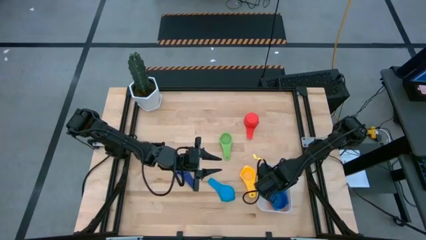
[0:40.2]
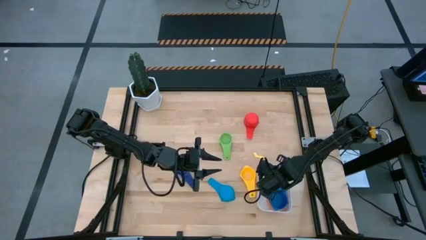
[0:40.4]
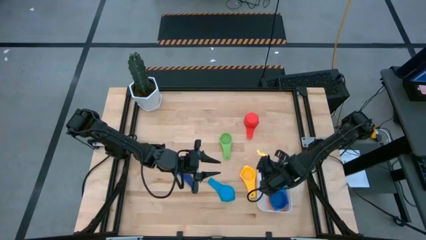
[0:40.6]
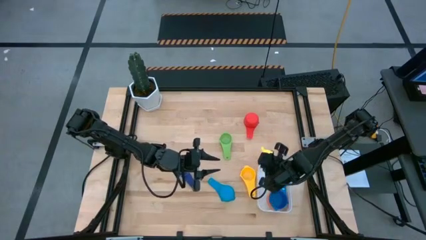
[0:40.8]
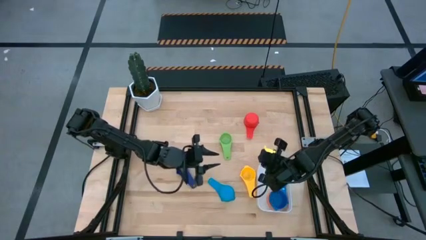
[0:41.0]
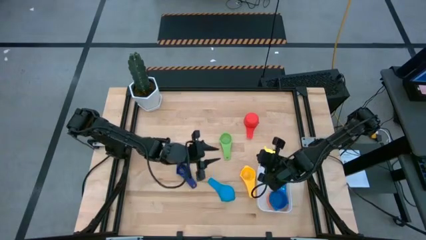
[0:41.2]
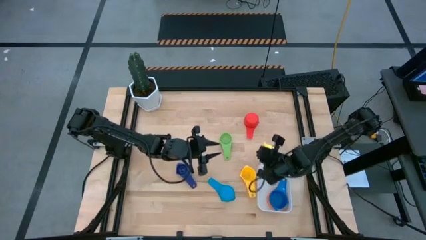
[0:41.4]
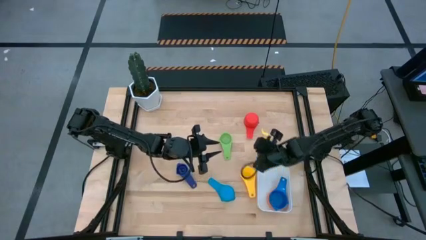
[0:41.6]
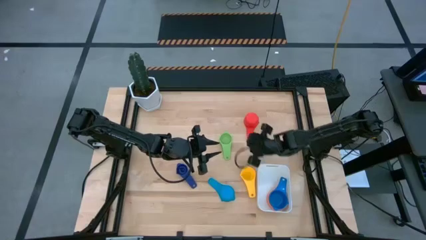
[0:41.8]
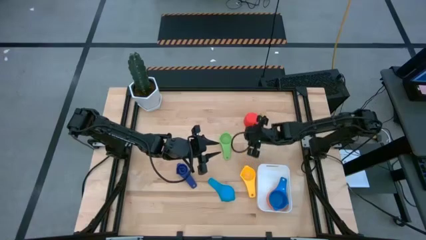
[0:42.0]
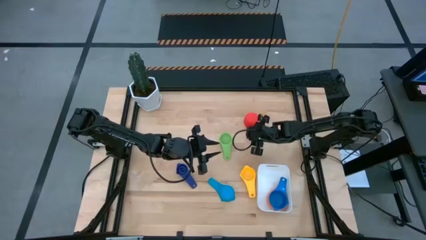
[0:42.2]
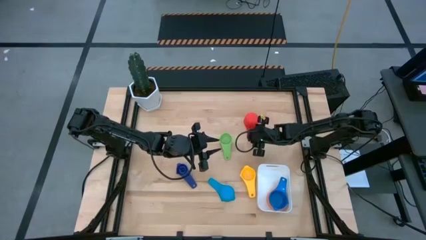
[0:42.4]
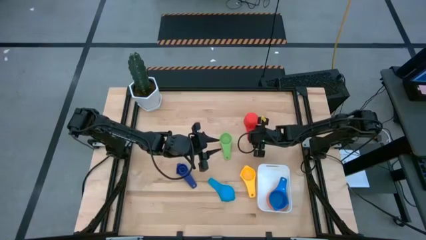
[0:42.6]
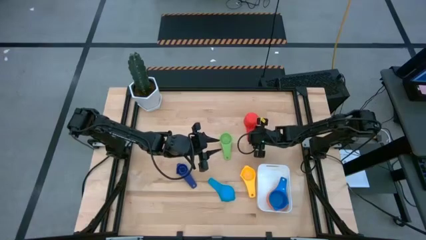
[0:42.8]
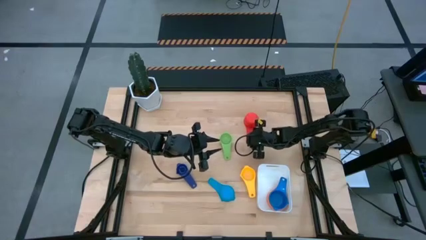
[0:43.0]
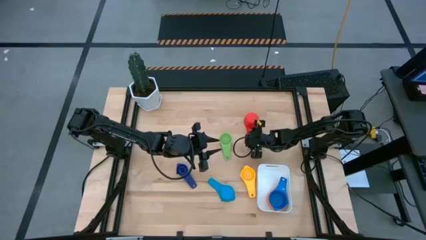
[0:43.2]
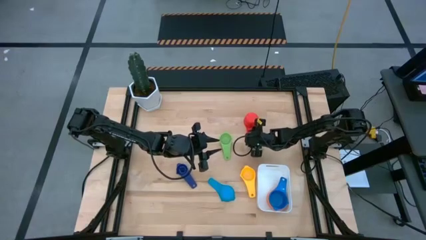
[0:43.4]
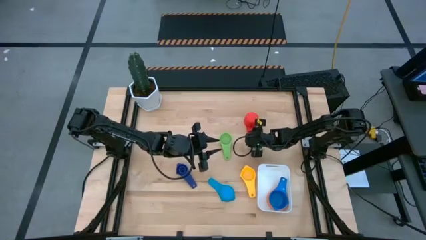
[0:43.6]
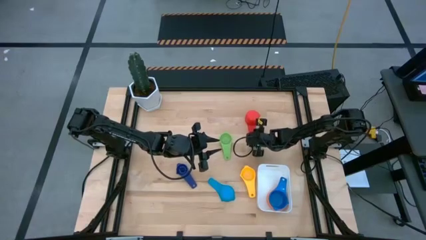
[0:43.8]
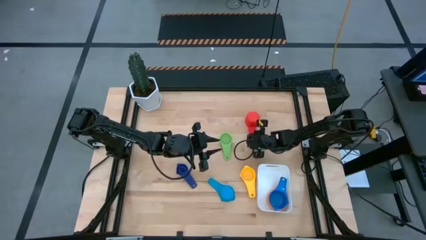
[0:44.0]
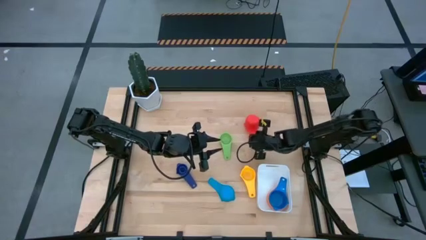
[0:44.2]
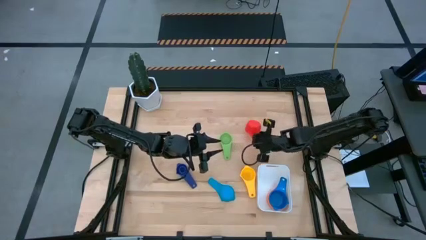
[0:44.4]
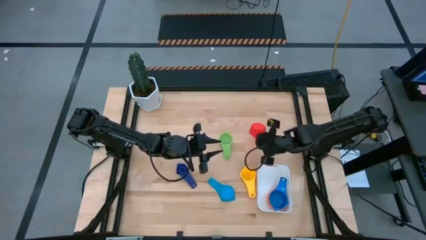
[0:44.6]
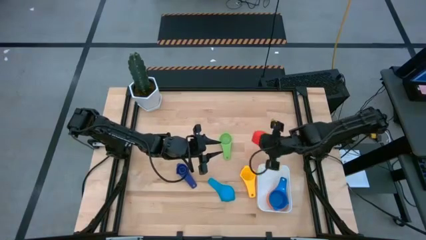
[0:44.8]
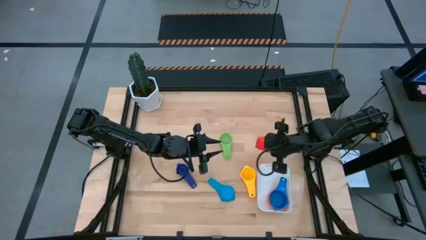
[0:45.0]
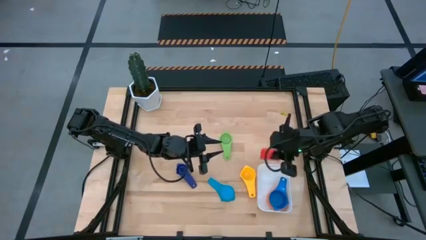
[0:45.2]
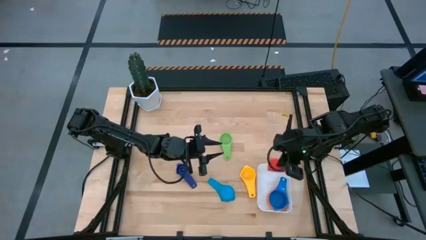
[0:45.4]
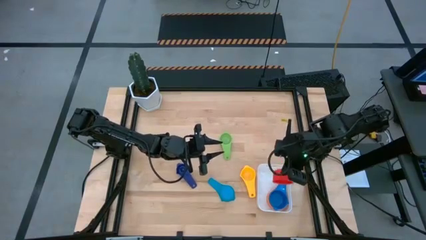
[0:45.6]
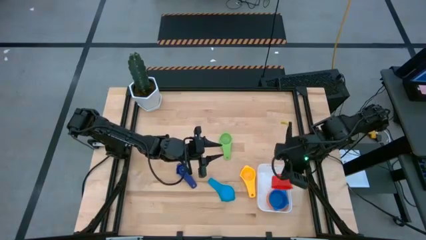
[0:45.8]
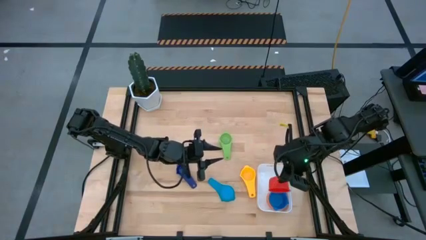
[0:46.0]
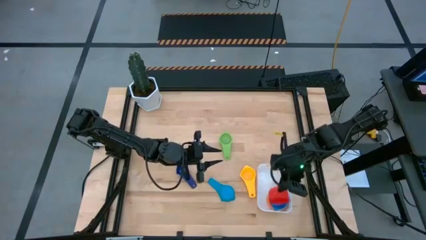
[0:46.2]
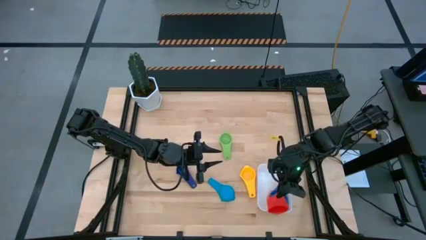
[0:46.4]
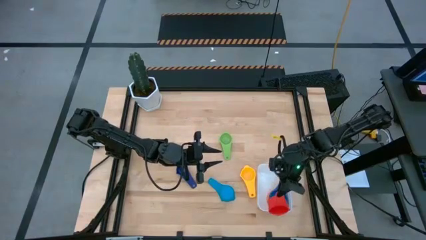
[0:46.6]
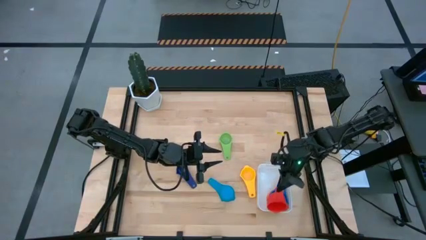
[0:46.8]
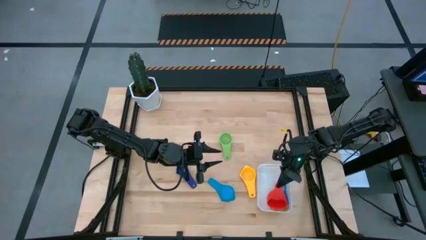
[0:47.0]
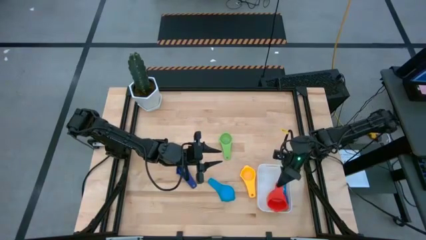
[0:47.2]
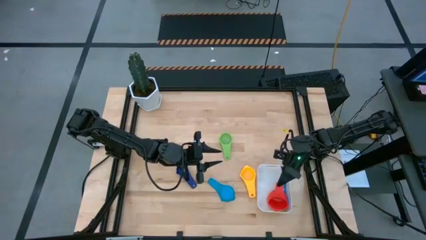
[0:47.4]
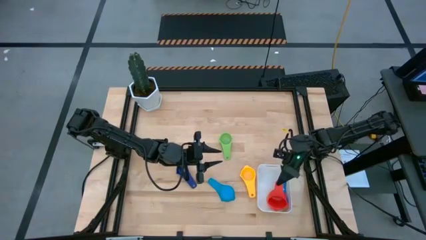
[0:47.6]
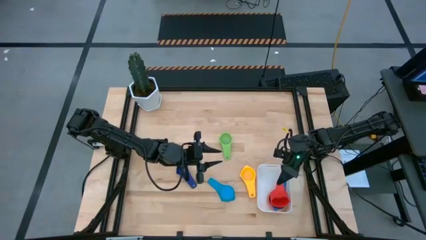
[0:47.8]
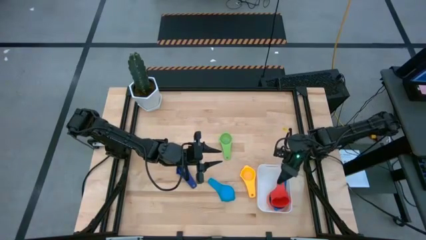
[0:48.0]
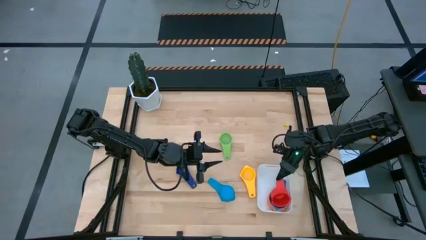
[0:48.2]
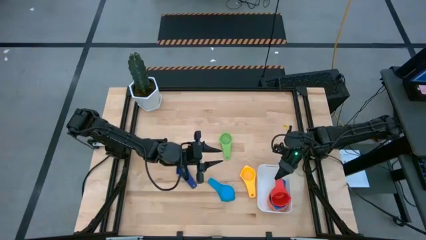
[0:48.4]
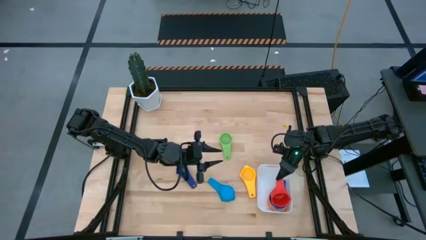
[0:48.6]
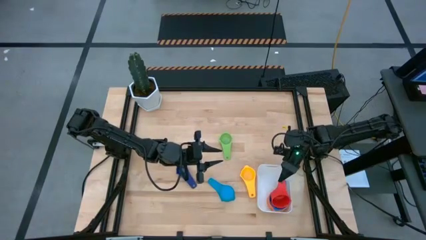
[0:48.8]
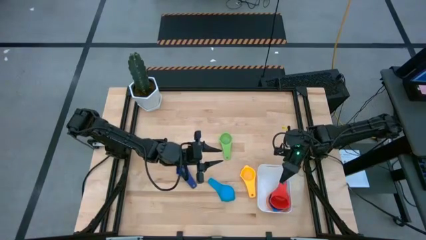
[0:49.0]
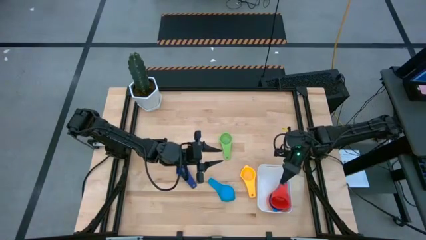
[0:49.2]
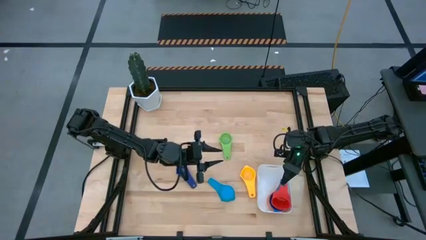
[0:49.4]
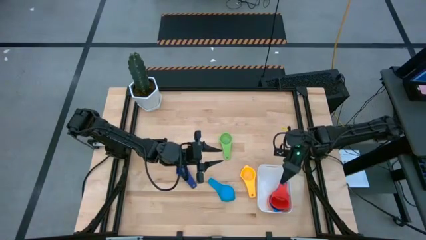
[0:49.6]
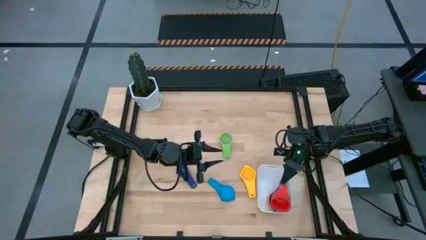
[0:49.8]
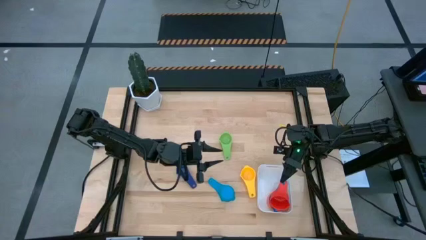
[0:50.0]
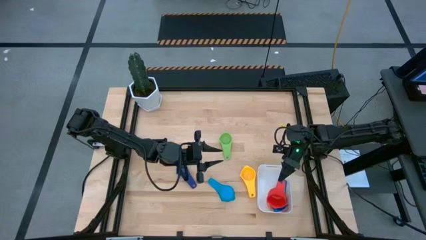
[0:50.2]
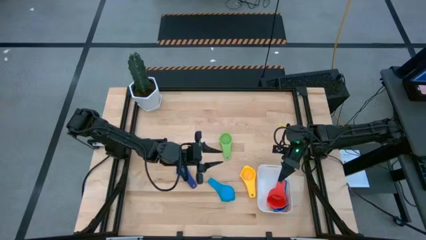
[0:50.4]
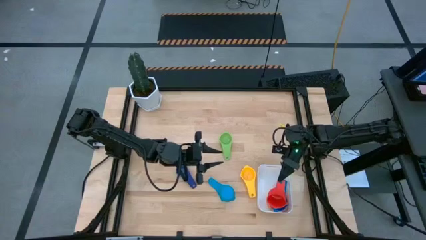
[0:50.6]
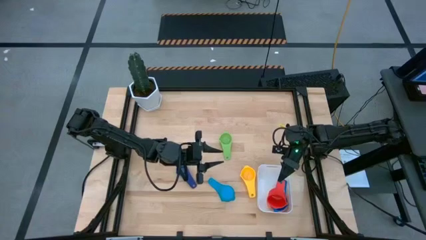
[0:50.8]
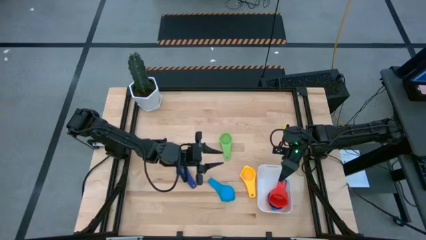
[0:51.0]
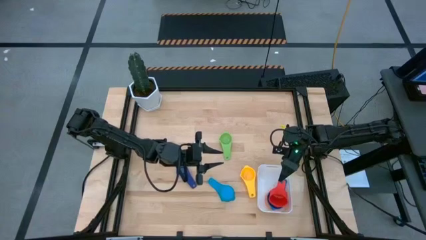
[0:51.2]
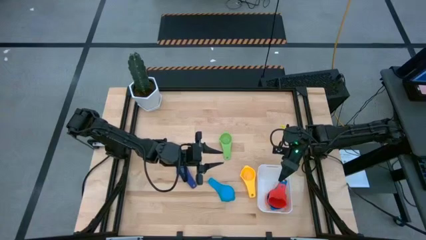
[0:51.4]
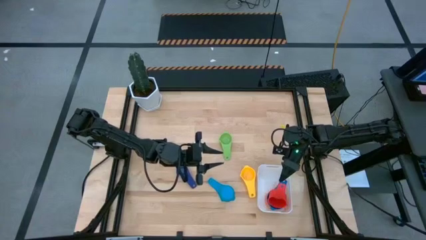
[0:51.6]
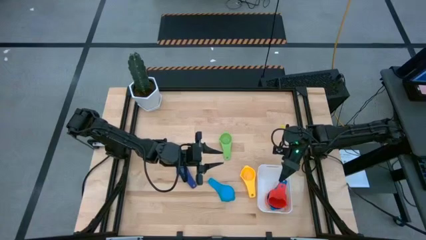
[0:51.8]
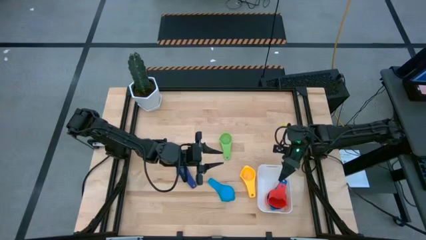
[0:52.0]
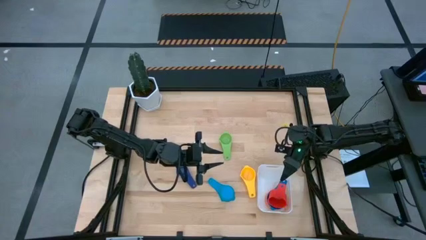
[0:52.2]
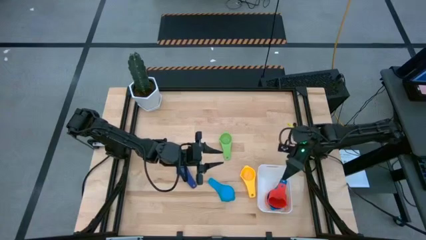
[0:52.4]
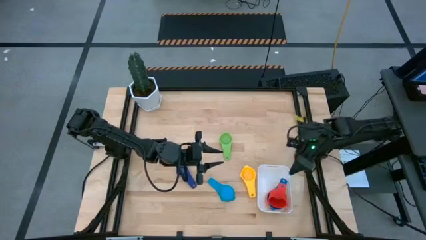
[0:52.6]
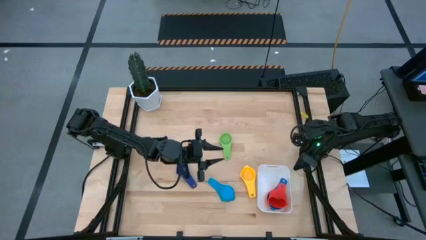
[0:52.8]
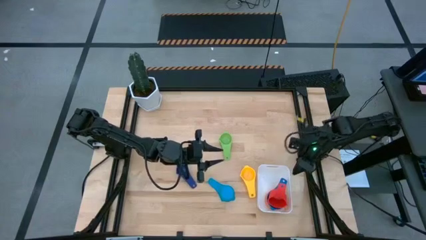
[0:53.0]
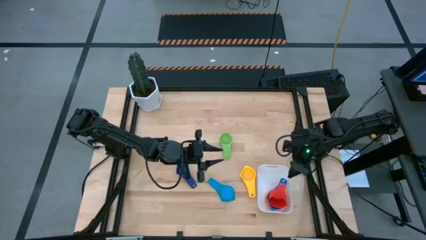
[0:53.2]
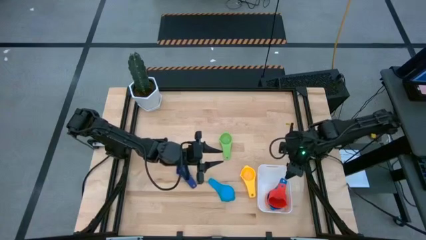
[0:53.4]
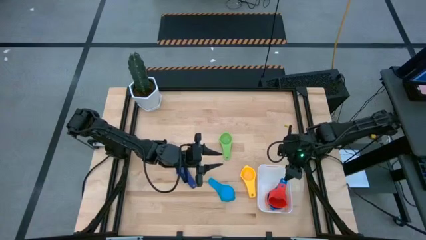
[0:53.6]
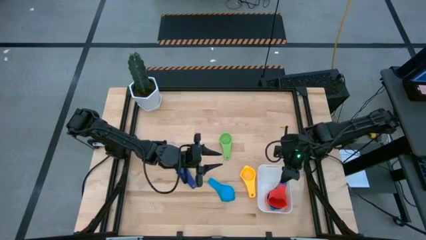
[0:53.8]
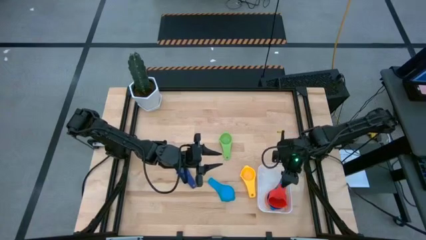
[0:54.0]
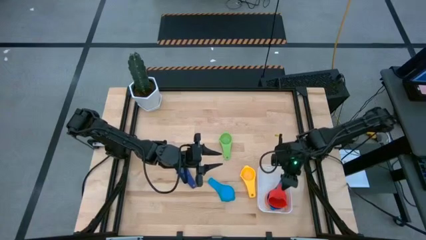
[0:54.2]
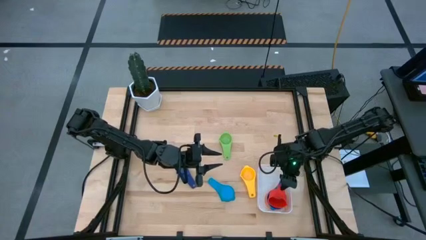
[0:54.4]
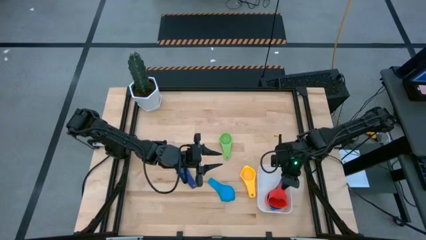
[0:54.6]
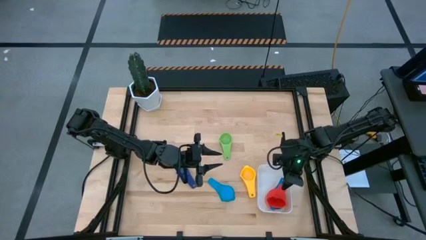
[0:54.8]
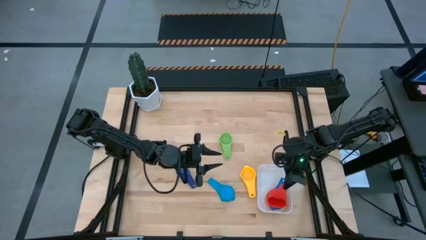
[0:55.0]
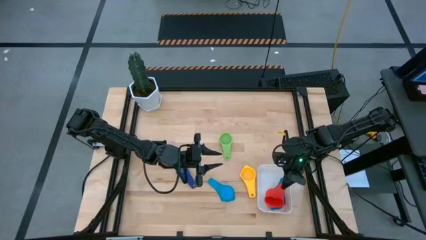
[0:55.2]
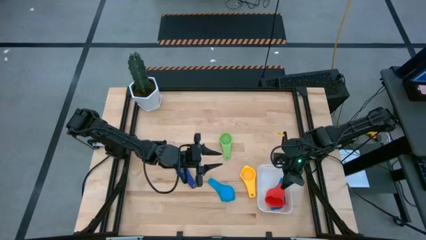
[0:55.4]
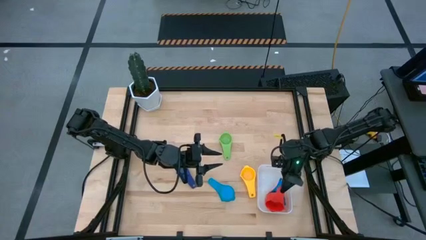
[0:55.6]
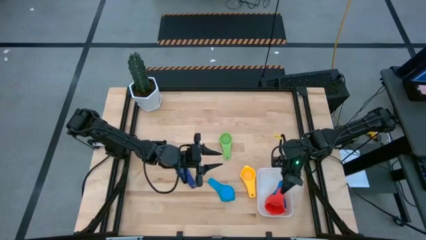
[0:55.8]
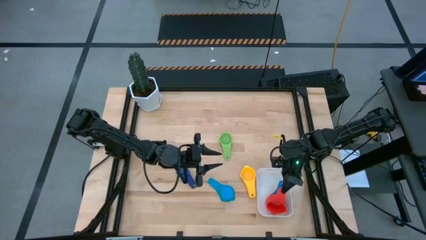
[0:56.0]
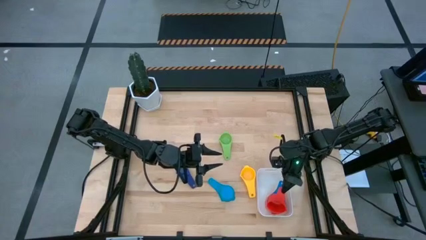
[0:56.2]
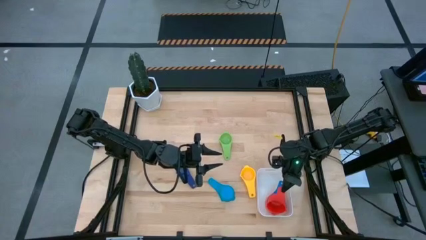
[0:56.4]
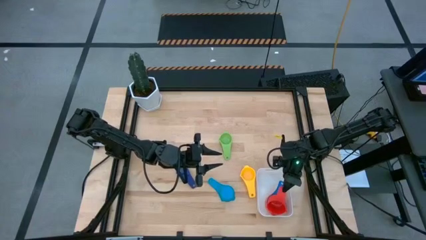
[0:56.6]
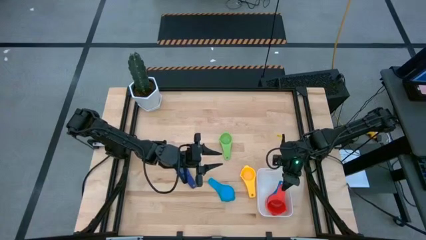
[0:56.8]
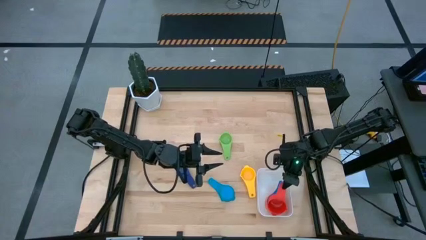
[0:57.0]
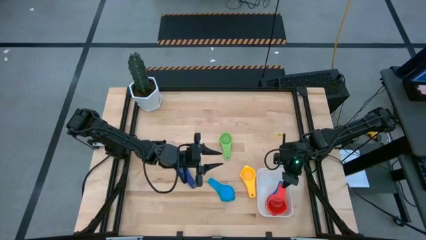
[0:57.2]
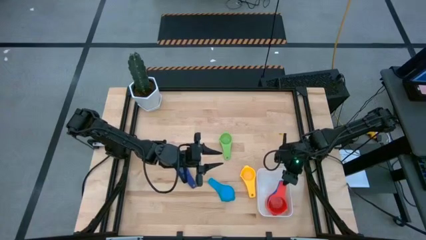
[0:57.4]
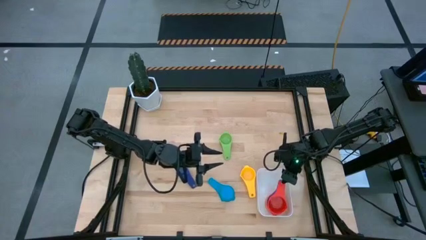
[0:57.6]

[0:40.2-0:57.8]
Task: Nest measuring cups in basket
Stack the red measuring cup on top of the blue measuring cup into the white bin
